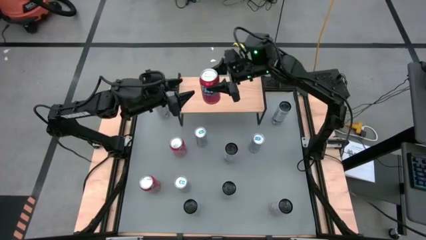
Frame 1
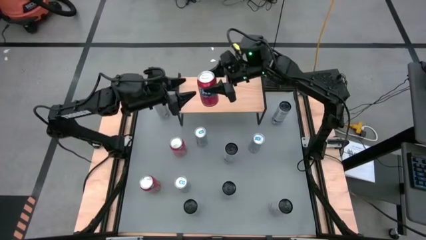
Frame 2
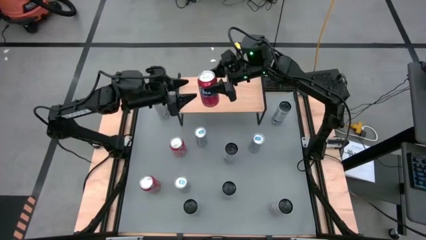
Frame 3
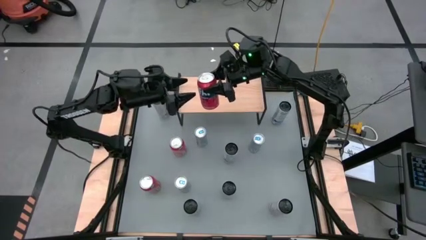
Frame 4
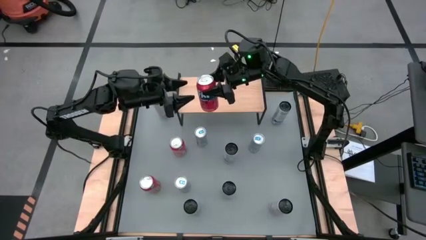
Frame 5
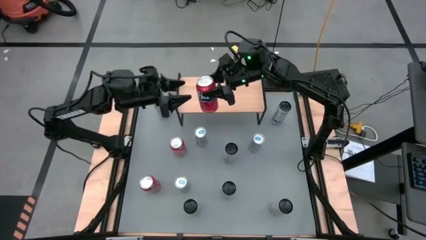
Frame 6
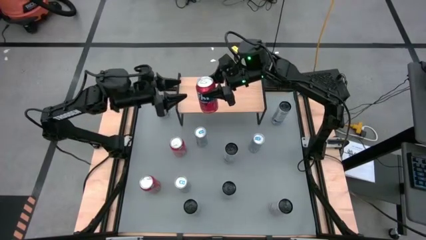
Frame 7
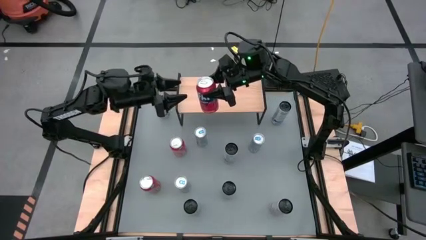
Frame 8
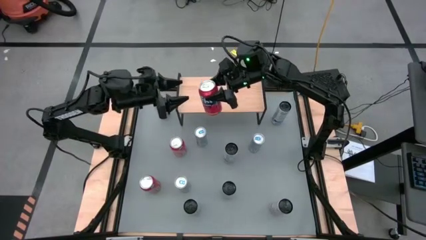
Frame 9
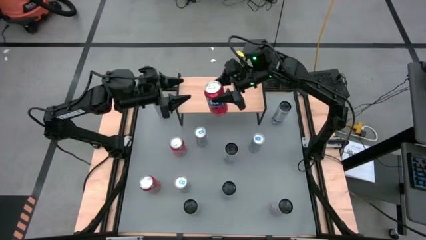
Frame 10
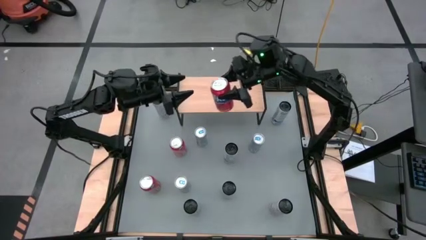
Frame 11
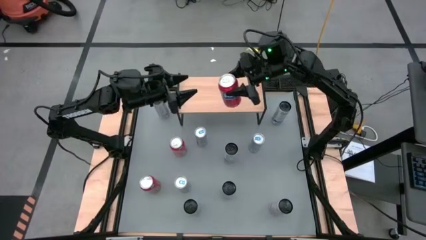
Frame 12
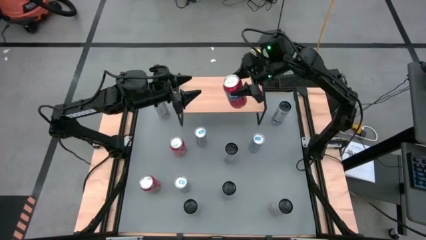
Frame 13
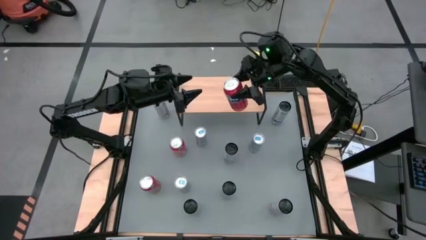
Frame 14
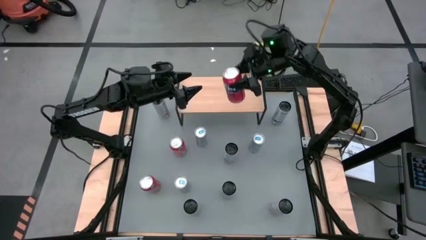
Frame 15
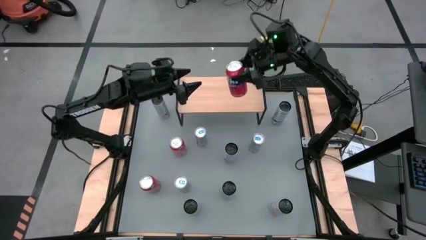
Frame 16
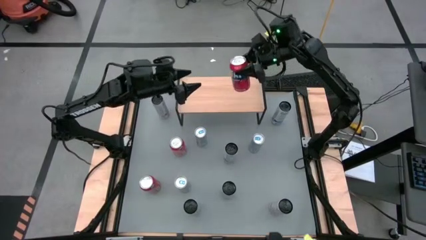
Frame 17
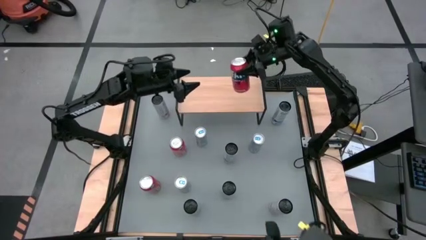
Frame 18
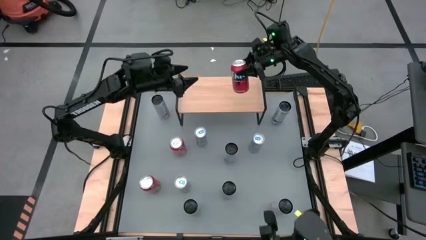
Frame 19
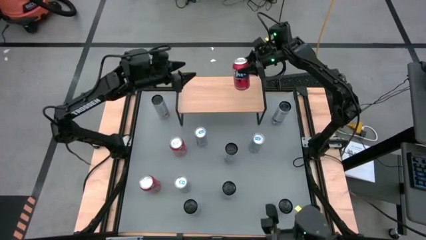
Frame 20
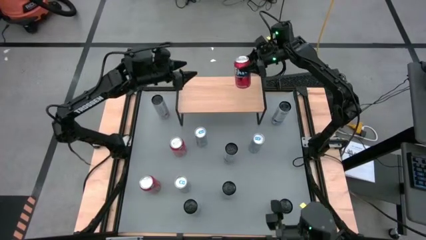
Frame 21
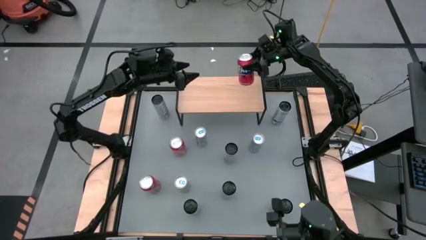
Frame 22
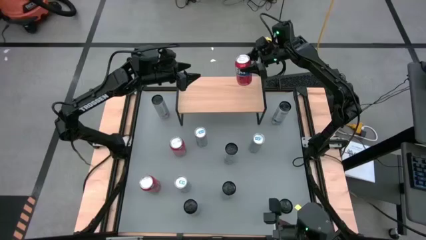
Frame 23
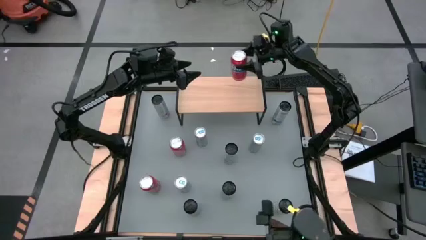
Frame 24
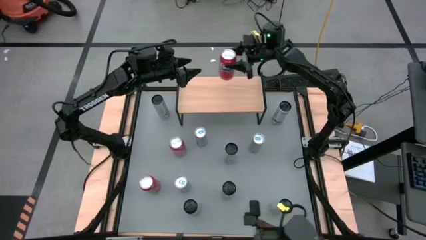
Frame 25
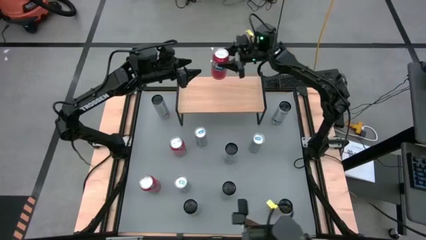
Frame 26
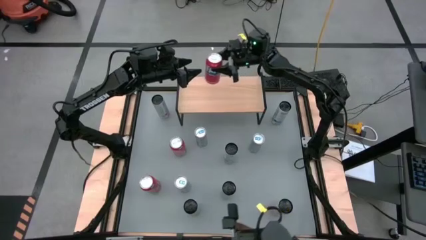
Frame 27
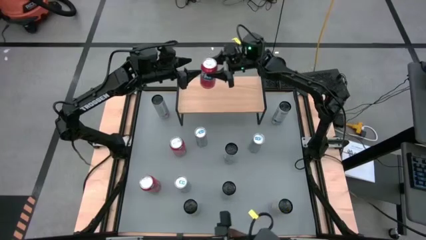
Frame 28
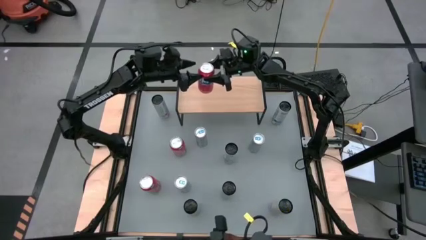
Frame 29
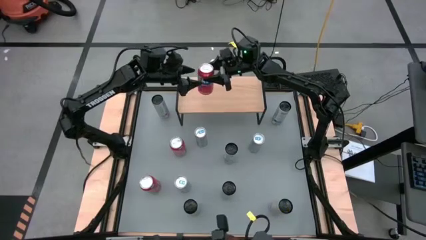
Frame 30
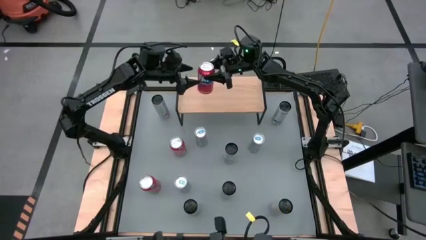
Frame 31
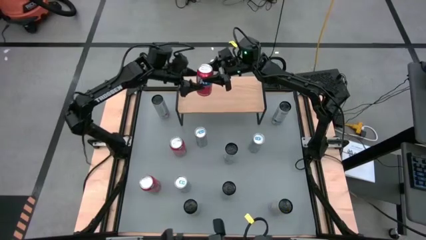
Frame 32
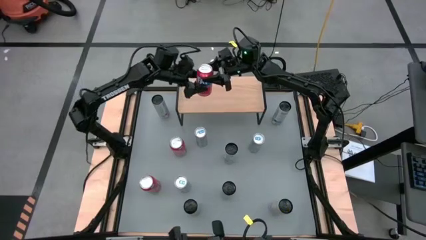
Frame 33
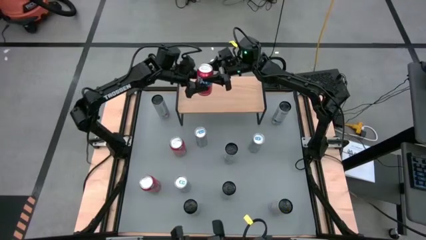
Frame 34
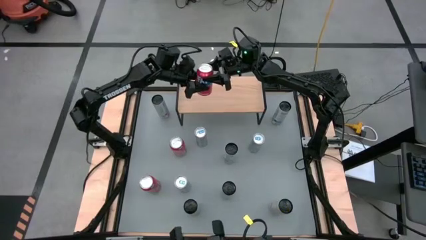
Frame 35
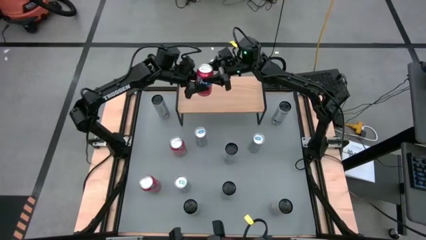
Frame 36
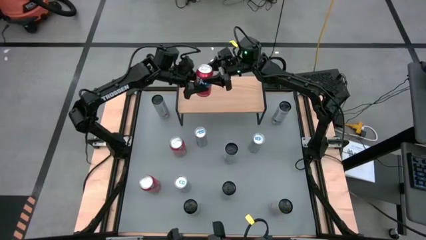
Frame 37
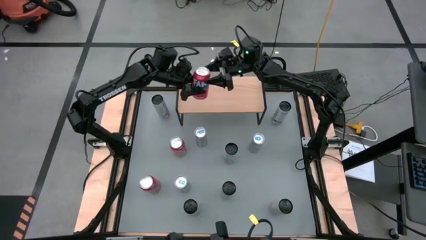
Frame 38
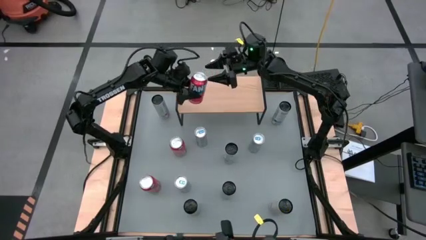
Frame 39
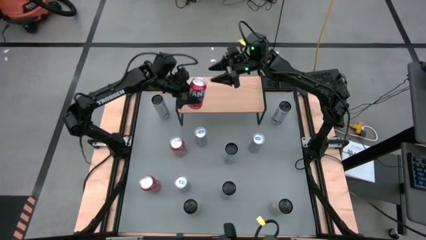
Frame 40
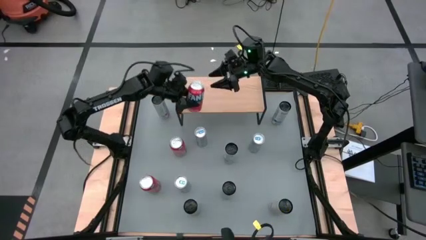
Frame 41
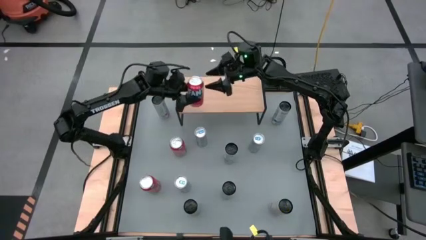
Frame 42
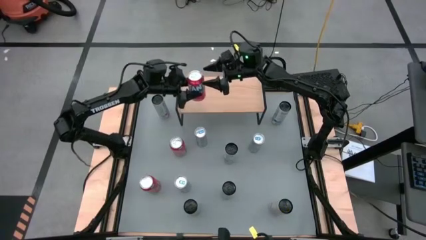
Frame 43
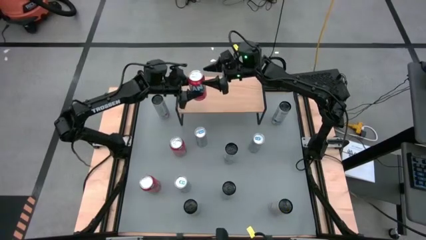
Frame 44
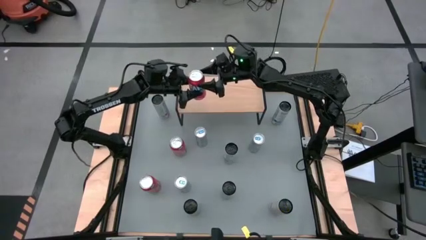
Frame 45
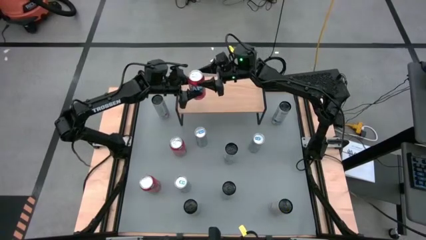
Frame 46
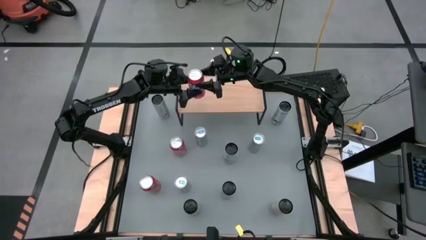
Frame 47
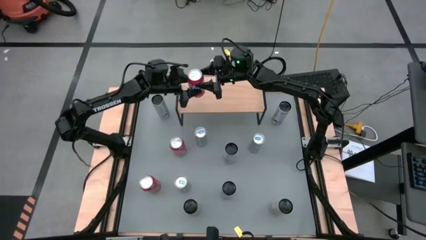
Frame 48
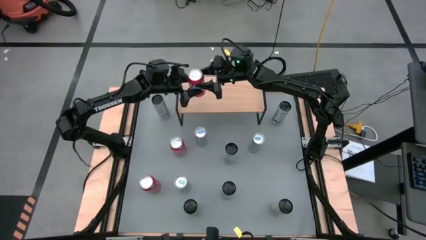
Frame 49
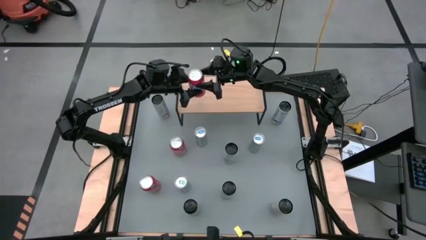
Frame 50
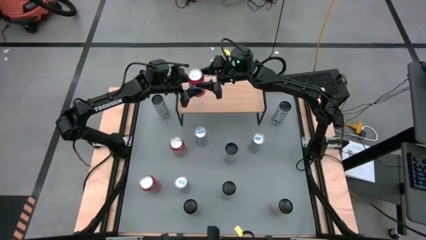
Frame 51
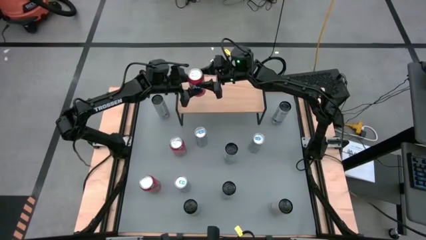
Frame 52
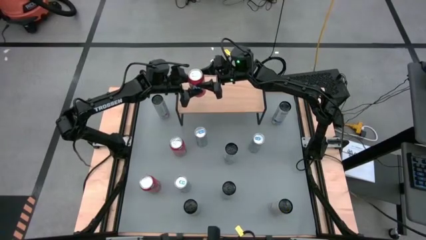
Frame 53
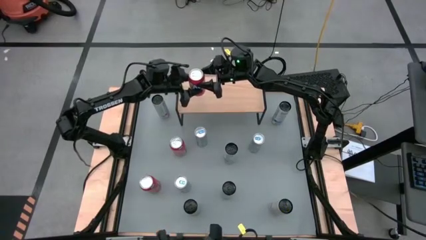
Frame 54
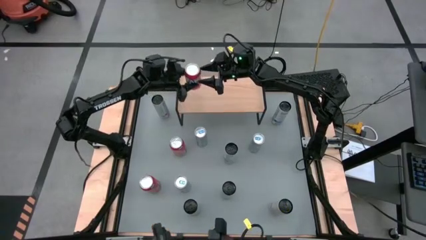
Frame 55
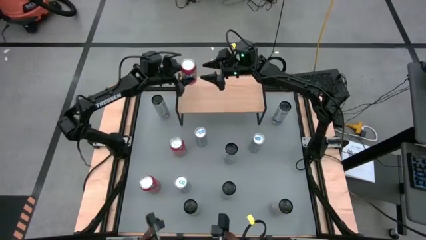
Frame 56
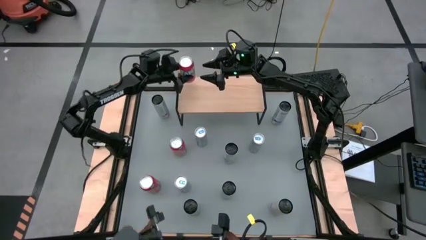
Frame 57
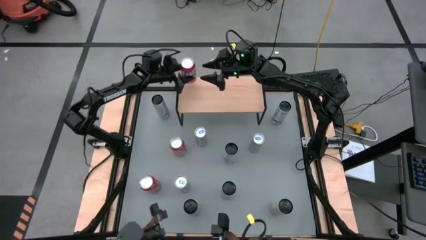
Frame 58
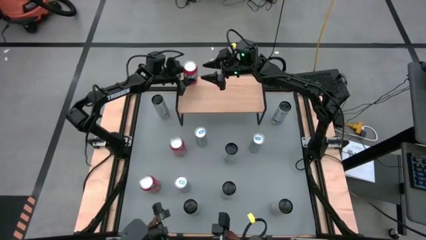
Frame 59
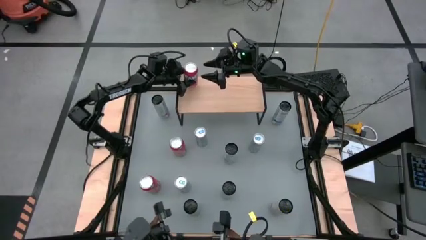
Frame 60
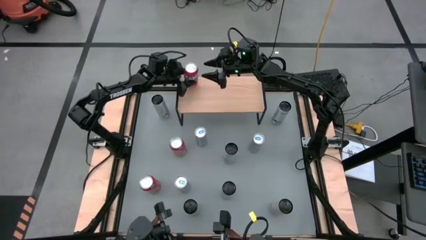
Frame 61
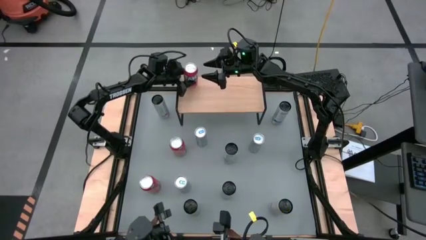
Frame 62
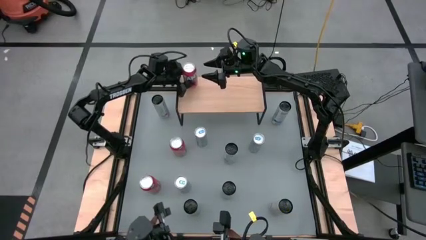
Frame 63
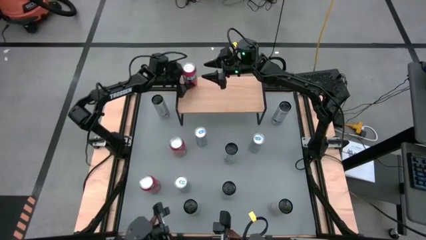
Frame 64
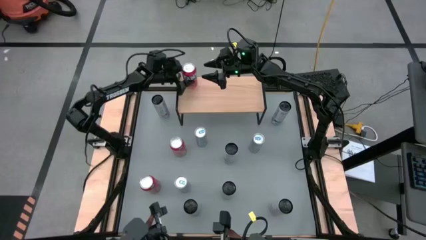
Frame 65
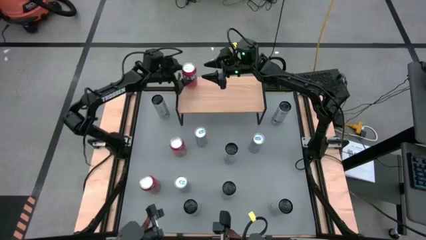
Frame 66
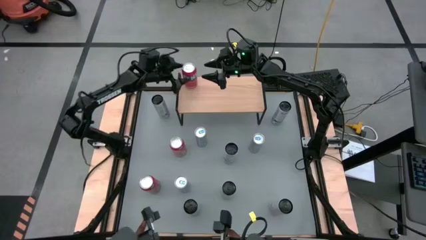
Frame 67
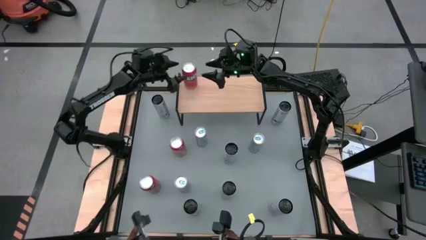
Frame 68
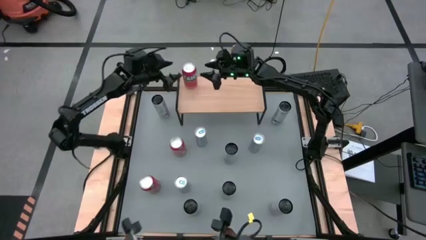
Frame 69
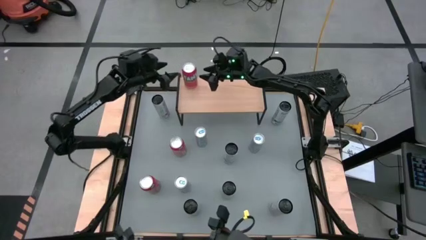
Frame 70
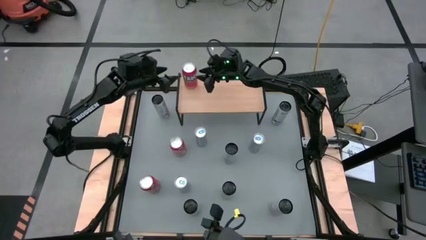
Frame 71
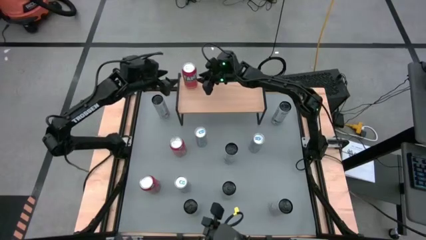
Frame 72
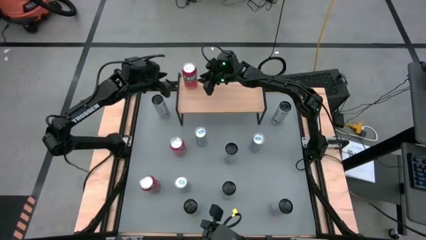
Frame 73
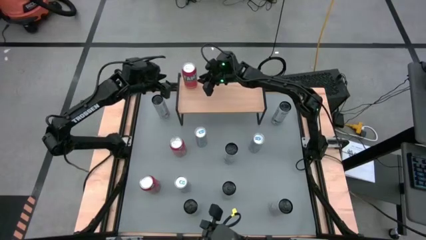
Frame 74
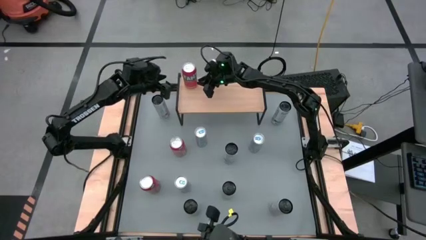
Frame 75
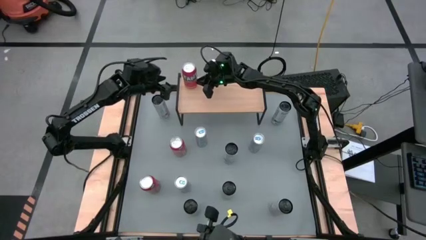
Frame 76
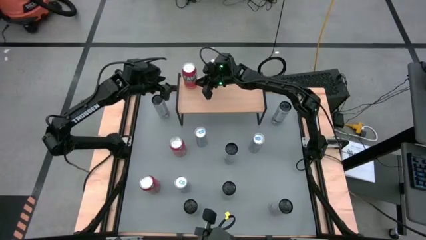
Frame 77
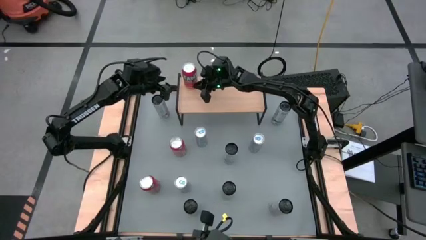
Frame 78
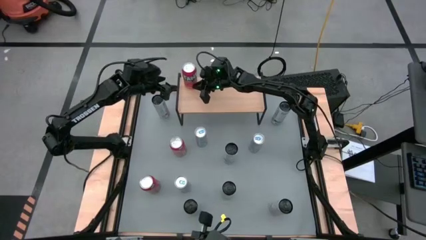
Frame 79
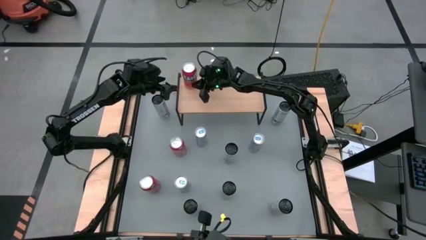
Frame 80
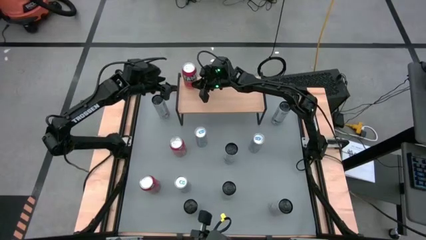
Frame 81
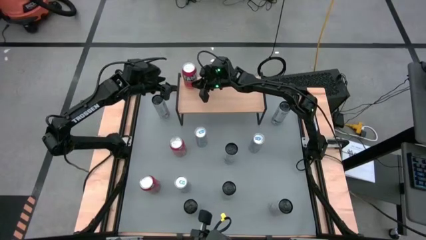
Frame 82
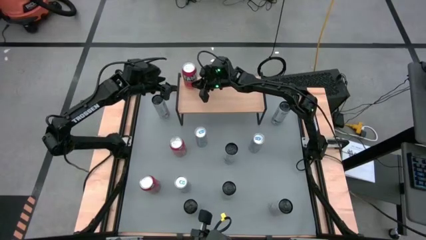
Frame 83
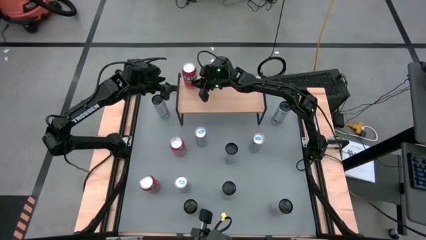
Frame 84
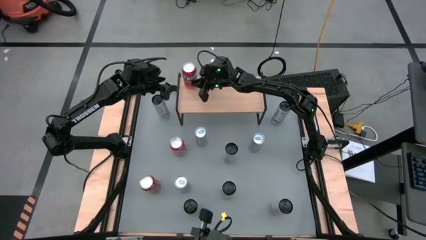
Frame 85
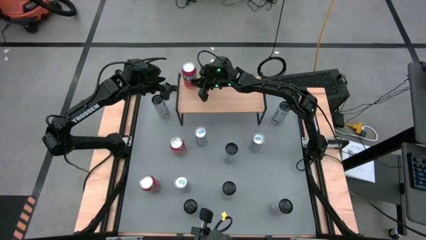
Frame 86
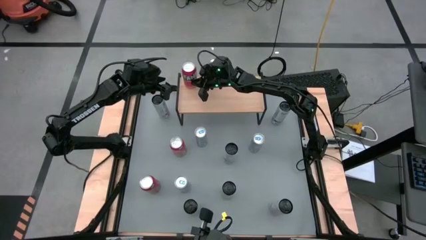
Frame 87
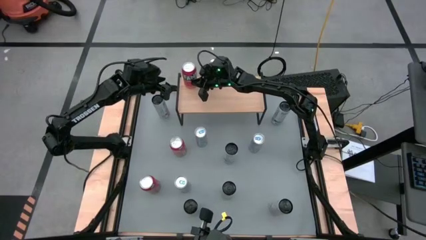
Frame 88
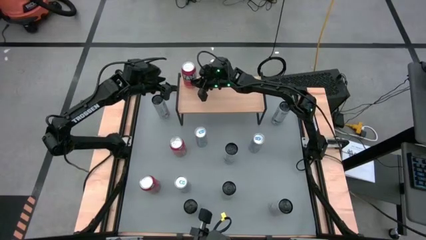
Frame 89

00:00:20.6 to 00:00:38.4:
Task: Place canned beverage on shelf
Put the bottom right red soda can on the shelf
